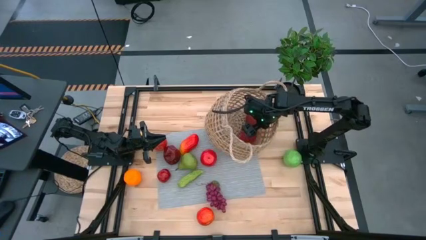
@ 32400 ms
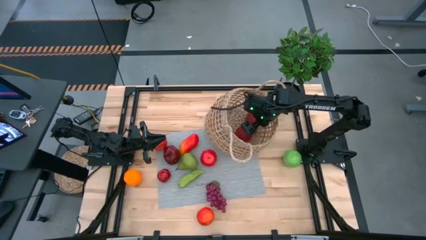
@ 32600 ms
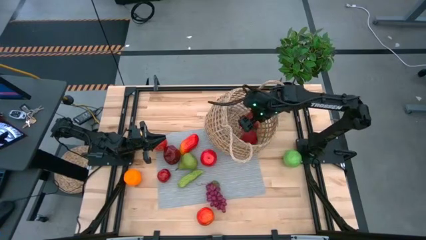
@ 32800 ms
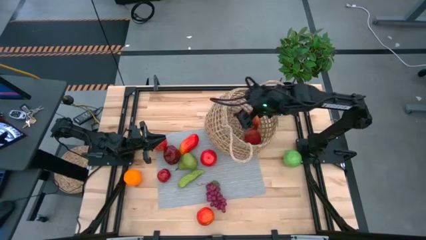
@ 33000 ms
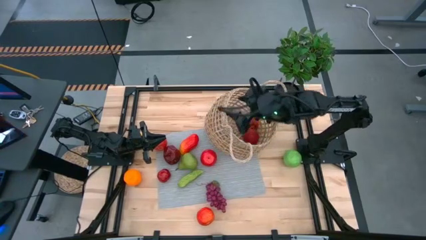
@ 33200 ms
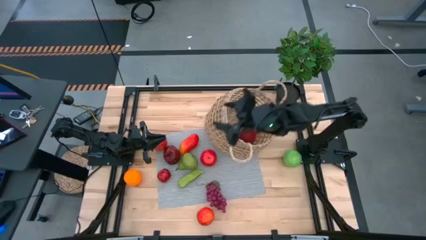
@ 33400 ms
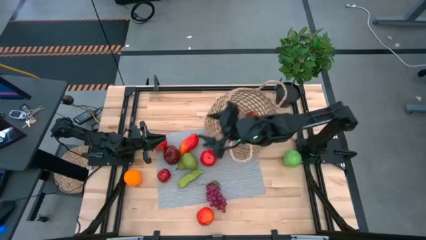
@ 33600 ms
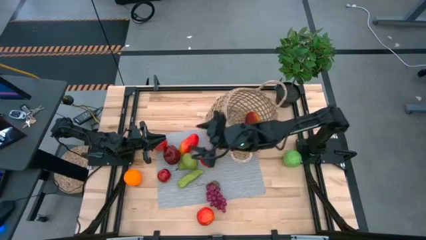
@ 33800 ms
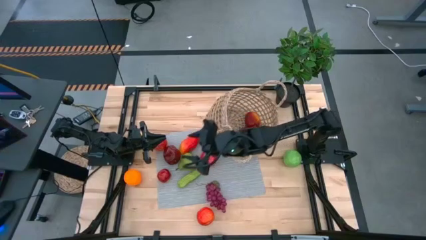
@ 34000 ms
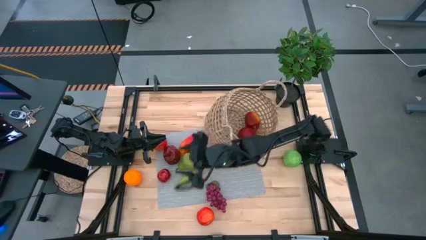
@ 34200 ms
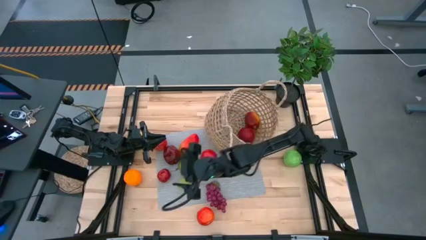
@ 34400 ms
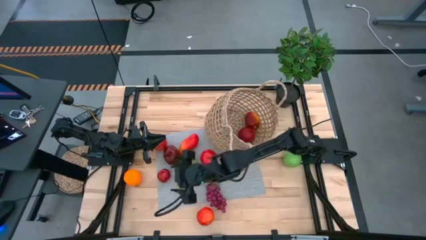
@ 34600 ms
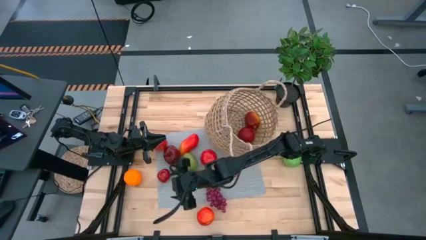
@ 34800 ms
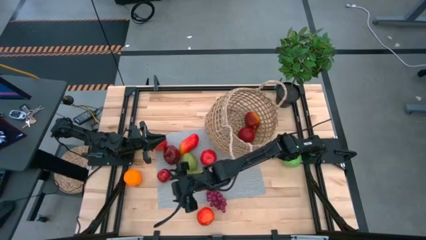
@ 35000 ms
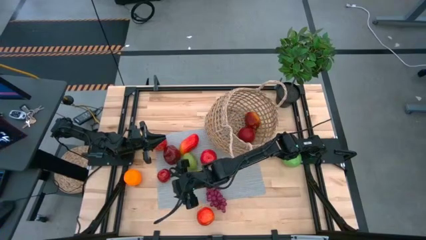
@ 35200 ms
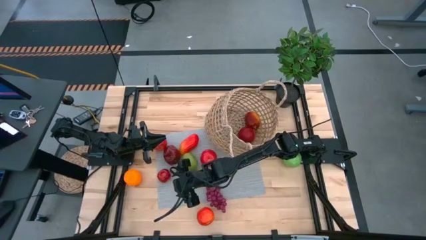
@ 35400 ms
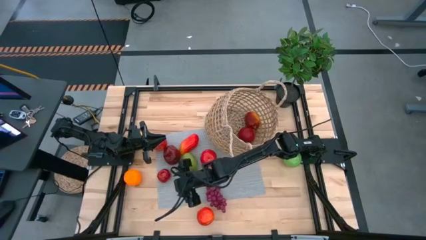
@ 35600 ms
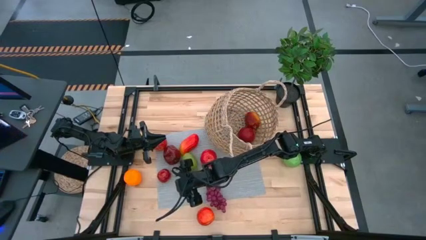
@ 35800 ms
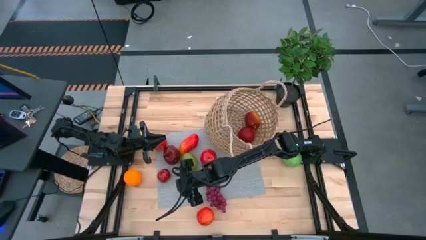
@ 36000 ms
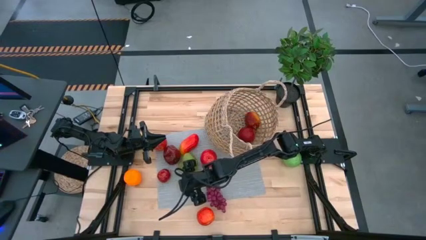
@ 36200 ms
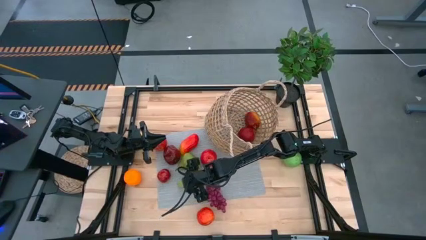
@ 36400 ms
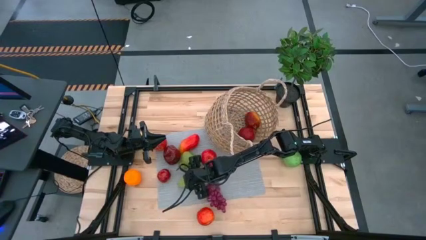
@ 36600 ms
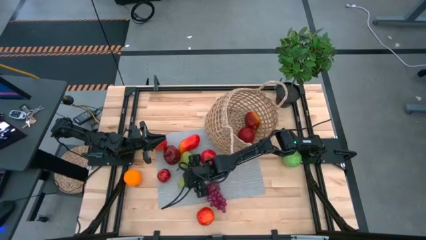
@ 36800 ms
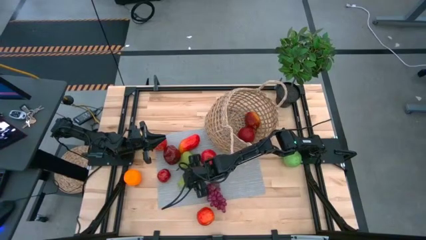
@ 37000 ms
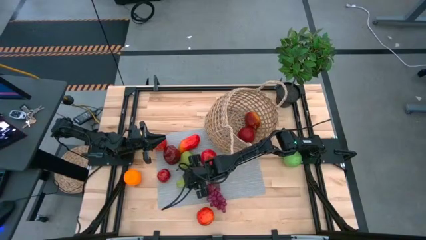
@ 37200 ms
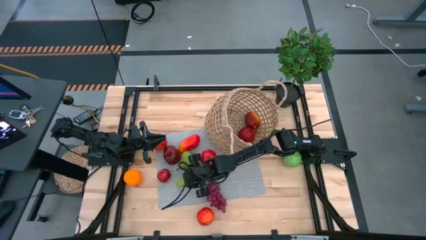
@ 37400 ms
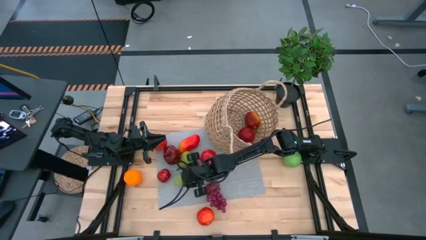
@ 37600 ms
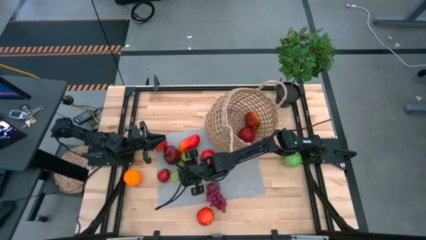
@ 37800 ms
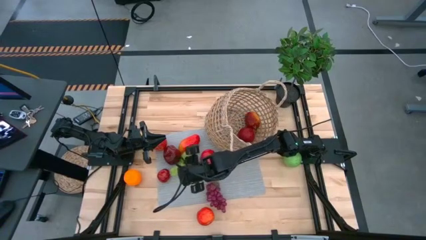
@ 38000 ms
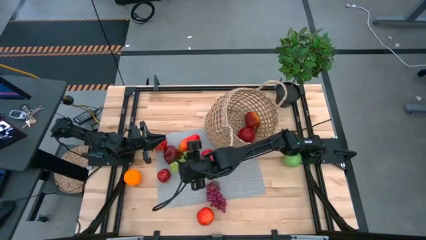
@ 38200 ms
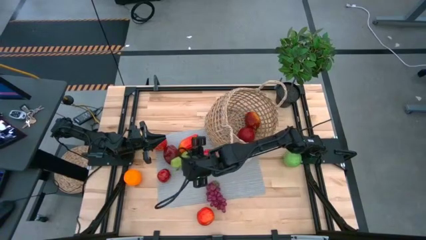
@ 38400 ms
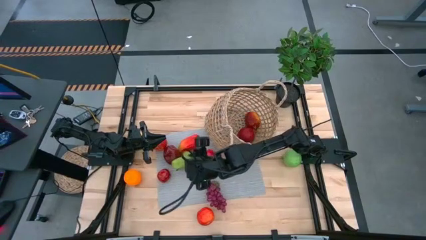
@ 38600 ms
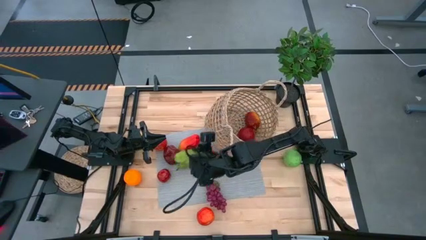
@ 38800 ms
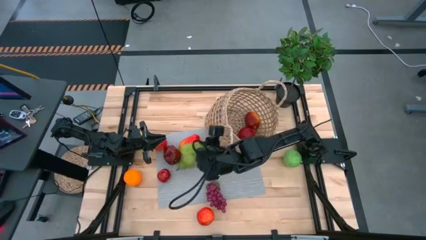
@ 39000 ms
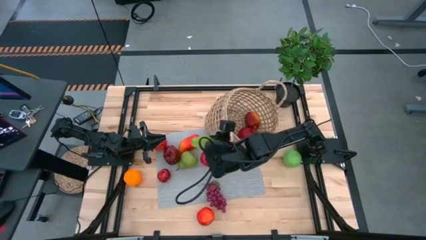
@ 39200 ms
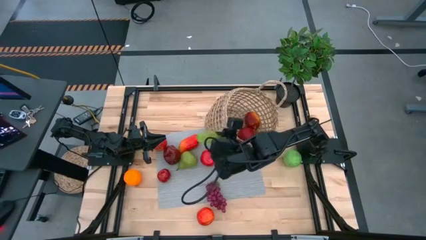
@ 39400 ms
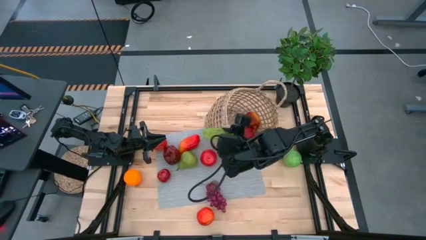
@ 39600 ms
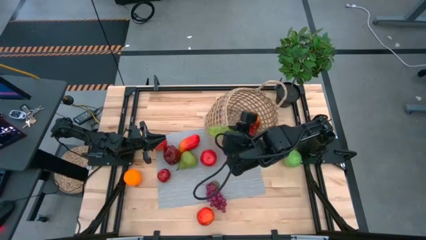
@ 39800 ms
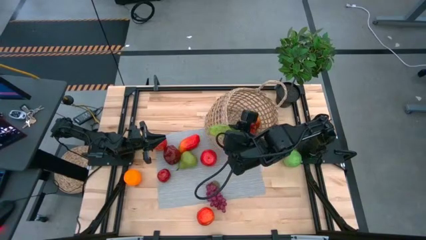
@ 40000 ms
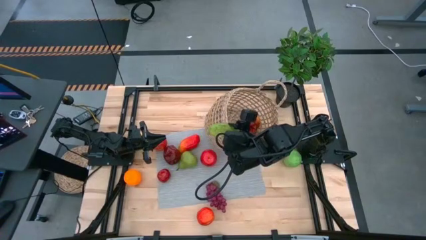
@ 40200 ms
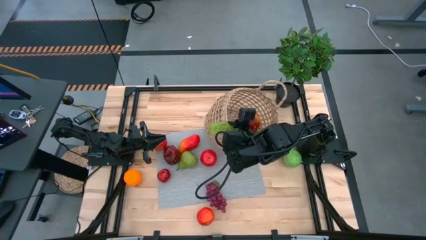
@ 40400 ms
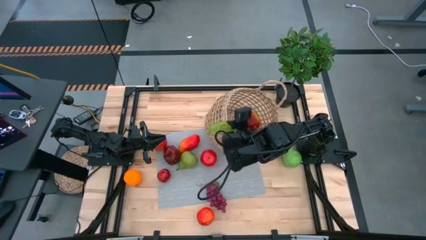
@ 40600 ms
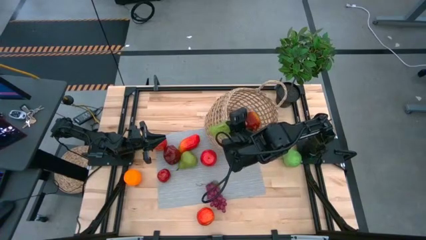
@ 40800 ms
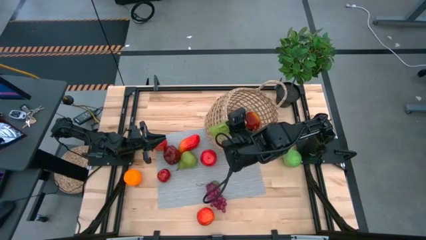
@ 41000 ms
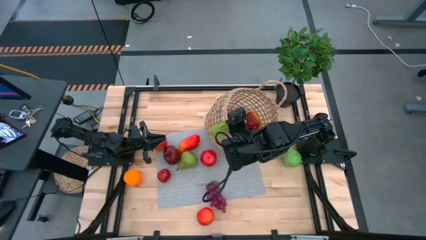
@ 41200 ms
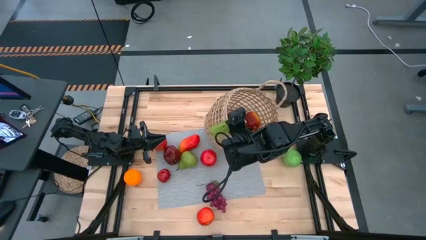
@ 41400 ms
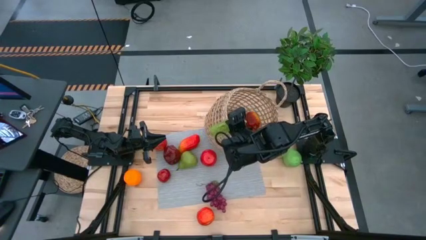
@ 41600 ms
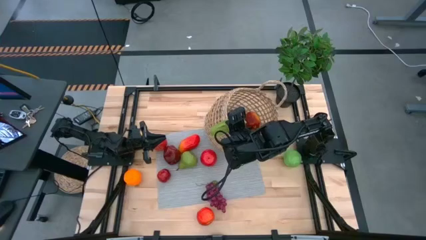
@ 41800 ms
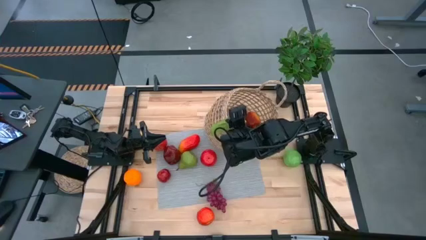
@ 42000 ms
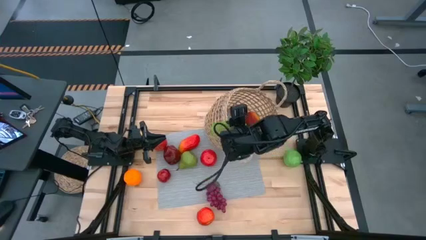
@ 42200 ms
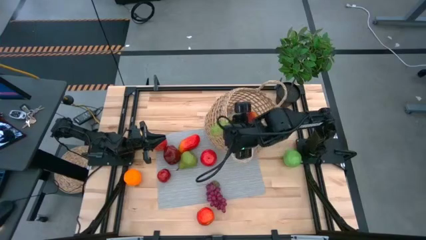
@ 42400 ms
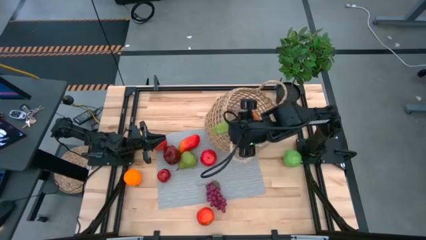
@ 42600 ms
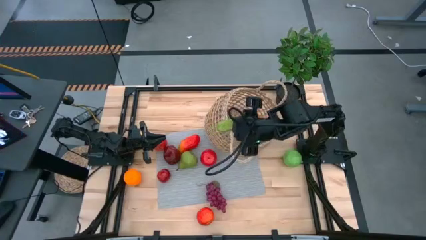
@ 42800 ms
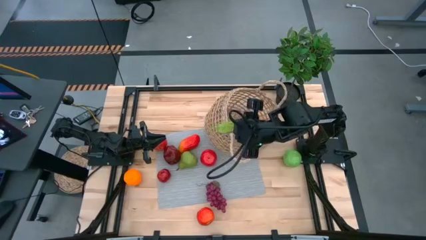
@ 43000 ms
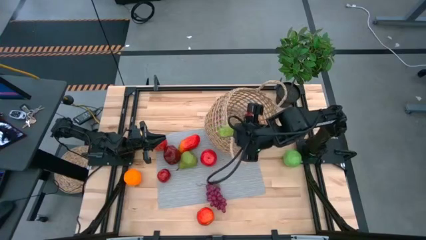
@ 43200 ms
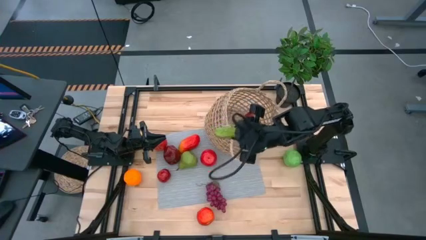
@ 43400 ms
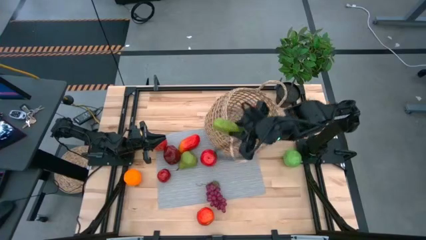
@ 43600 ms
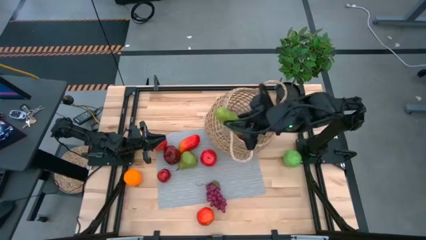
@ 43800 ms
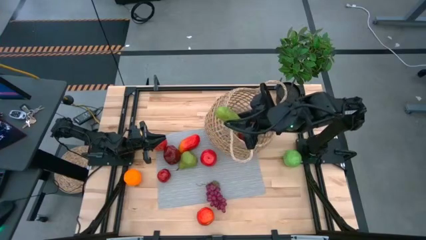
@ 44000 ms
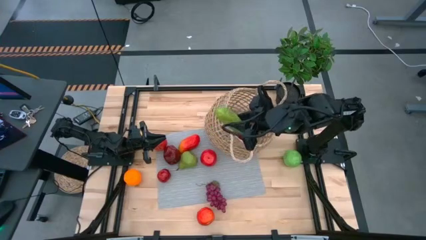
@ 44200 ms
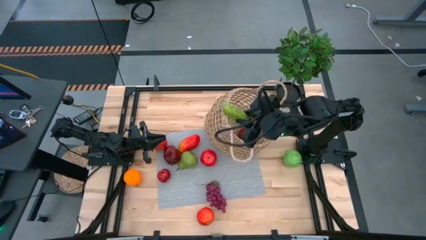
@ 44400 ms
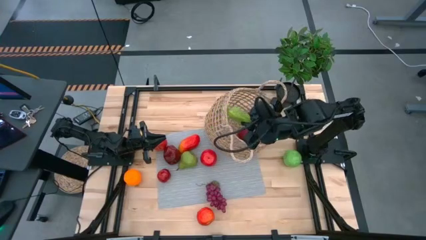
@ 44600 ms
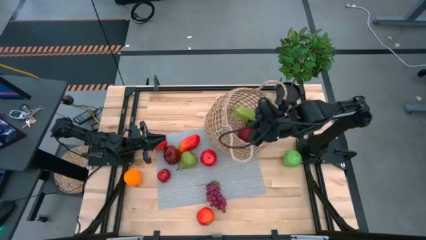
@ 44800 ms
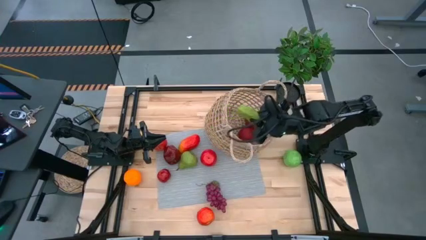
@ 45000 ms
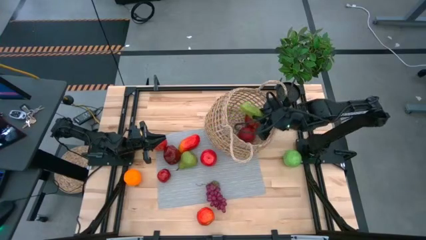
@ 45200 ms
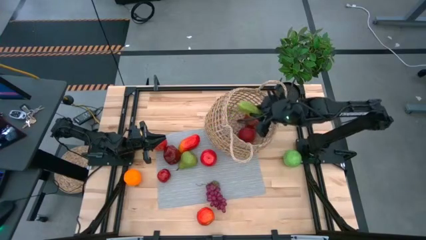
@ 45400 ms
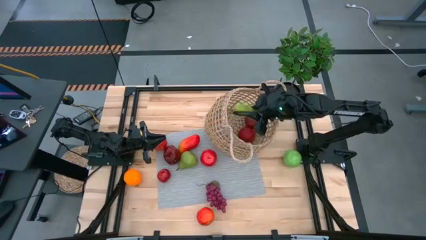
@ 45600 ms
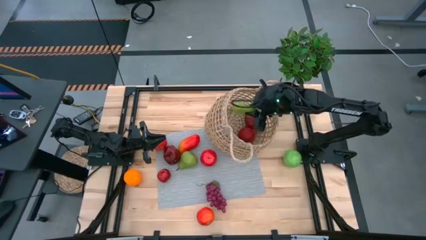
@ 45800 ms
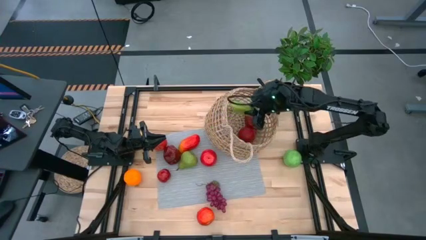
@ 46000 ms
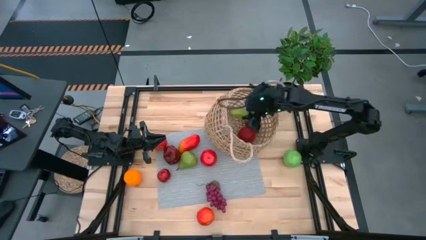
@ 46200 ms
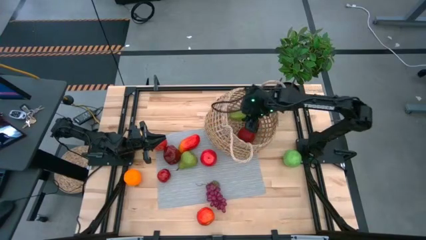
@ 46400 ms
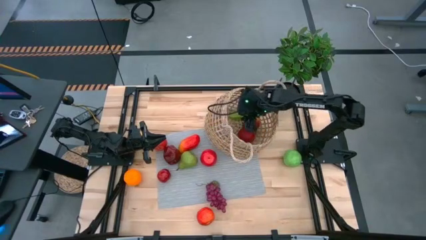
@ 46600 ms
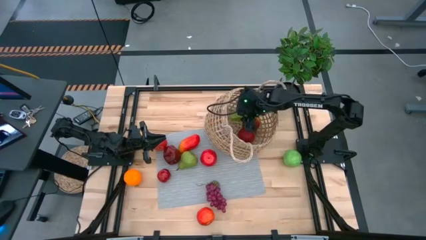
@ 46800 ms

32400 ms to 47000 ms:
Task: Build produce basket
Put the cucumber into the brown basket

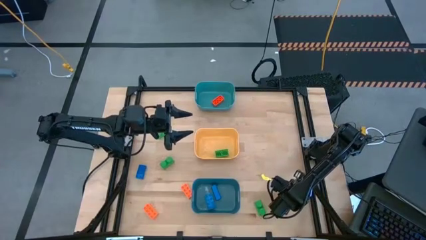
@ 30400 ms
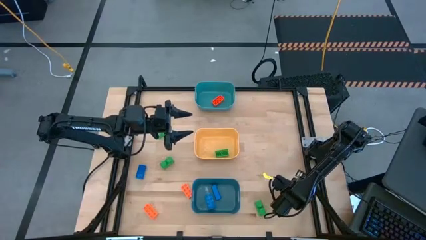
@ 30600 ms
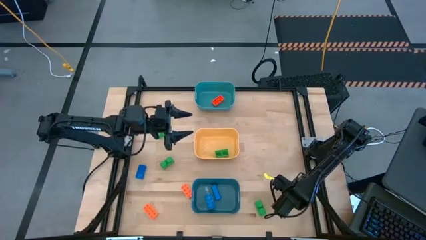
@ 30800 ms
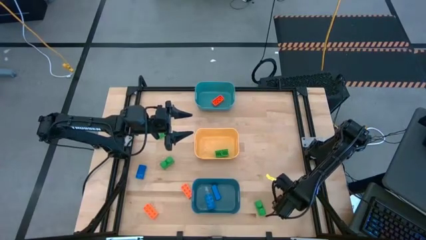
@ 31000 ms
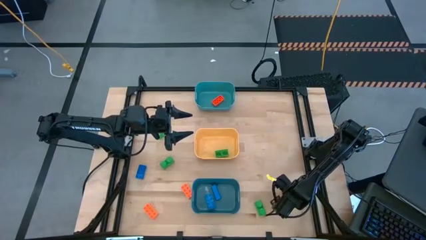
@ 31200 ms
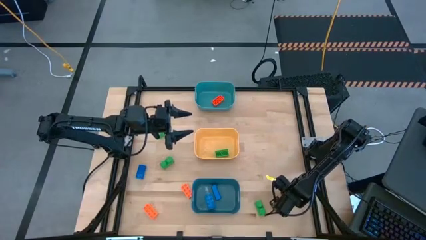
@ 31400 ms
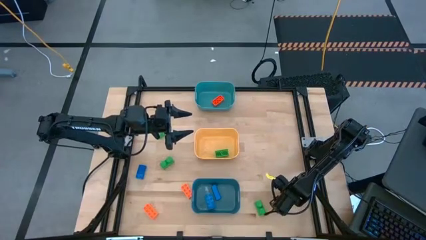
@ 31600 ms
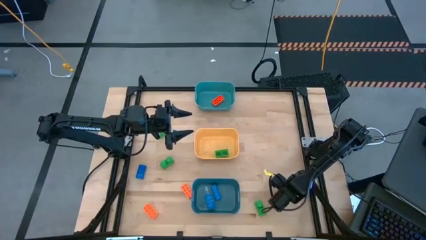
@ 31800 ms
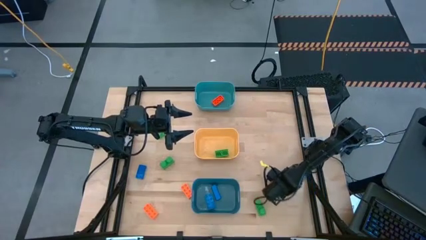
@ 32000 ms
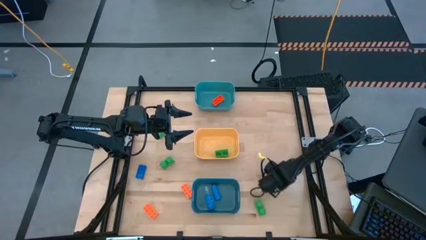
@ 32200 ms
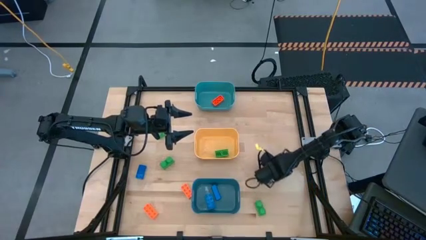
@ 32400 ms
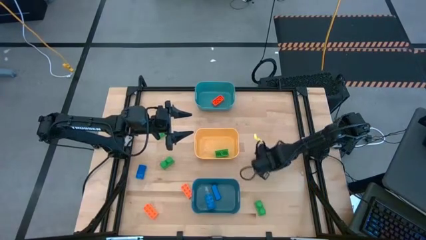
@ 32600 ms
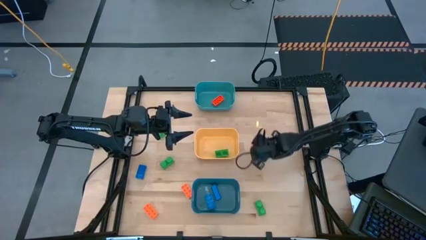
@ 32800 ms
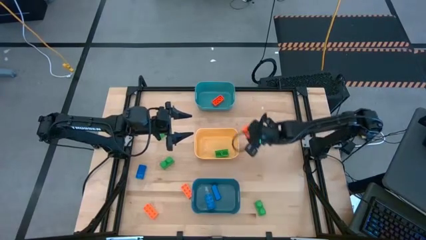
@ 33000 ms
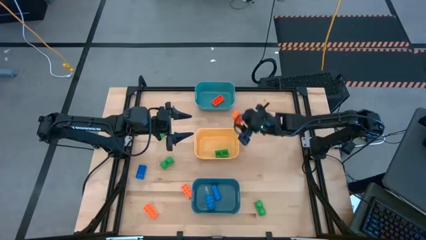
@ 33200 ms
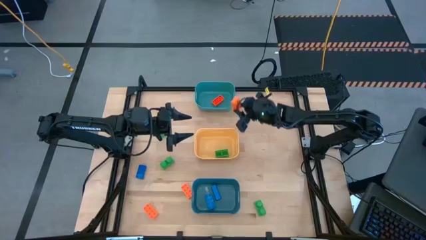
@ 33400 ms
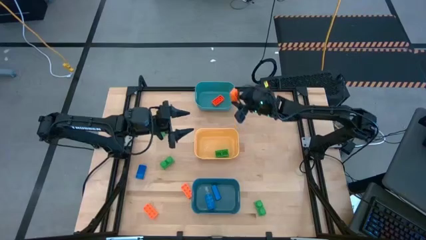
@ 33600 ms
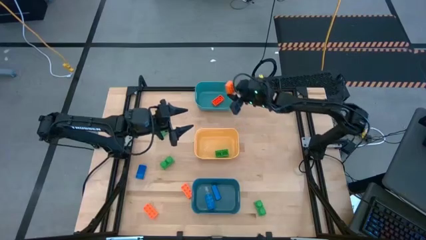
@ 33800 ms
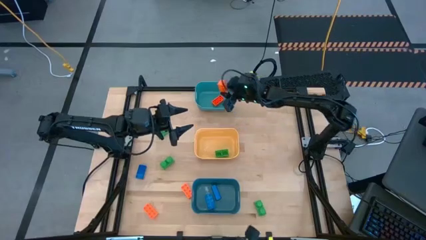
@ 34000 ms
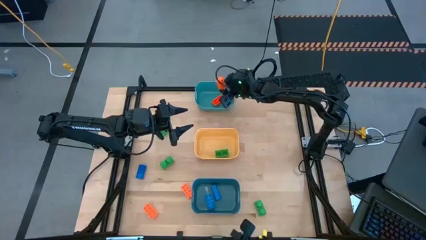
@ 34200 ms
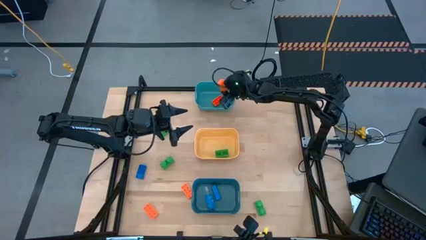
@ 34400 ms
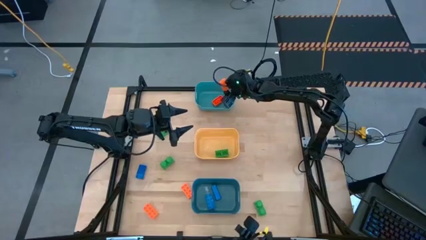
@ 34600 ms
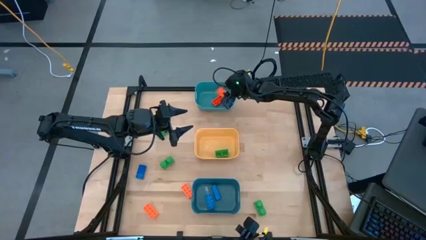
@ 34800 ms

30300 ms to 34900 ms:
Task: Sort & place blocks by color
Put the orange game piece into the green bin
